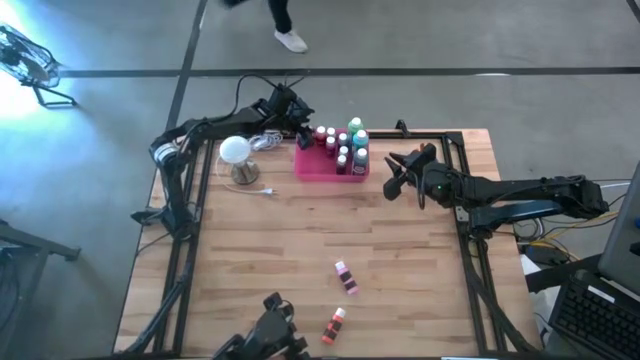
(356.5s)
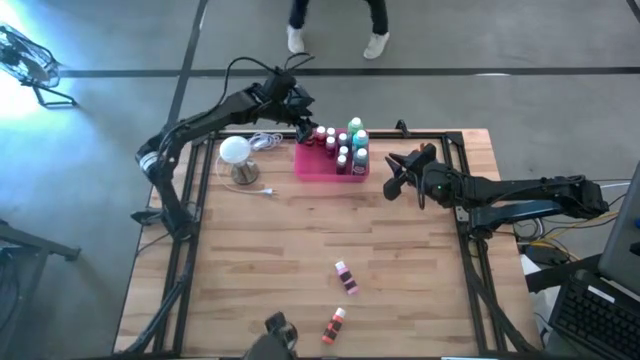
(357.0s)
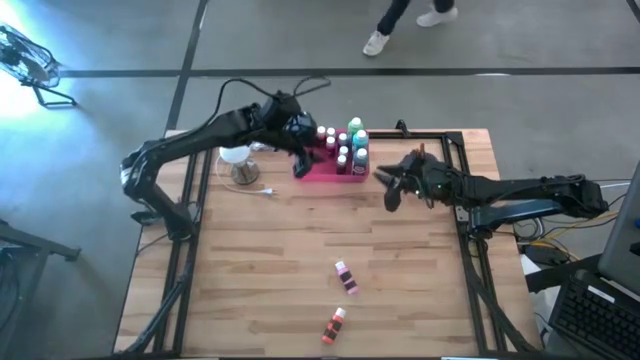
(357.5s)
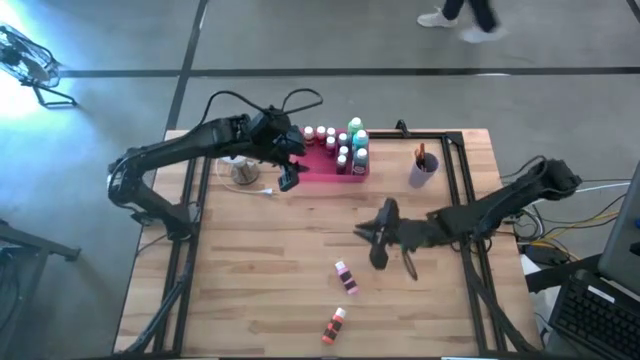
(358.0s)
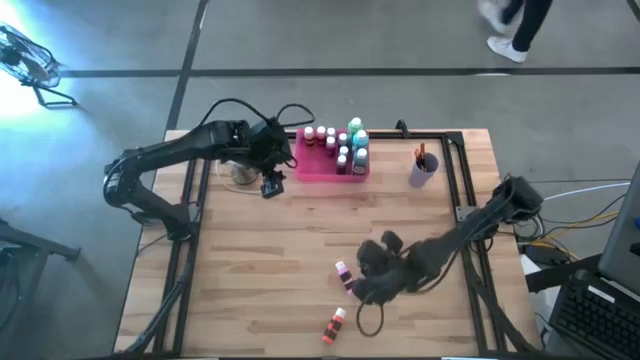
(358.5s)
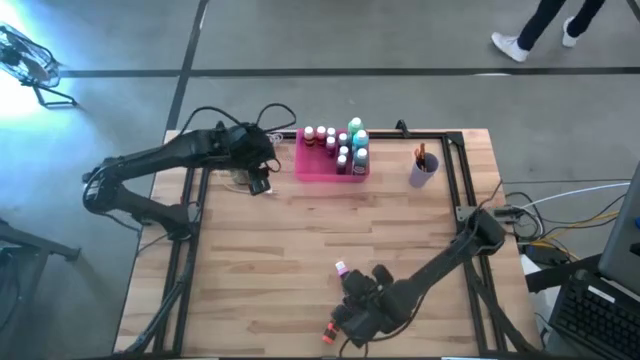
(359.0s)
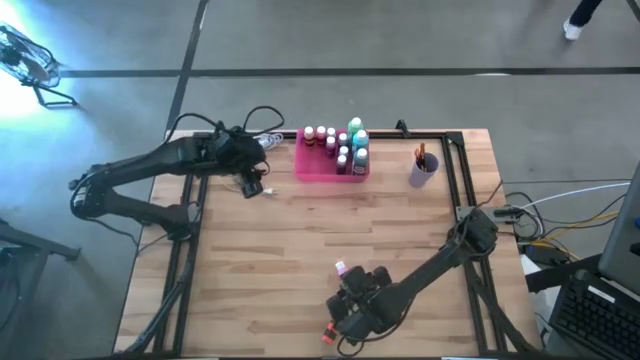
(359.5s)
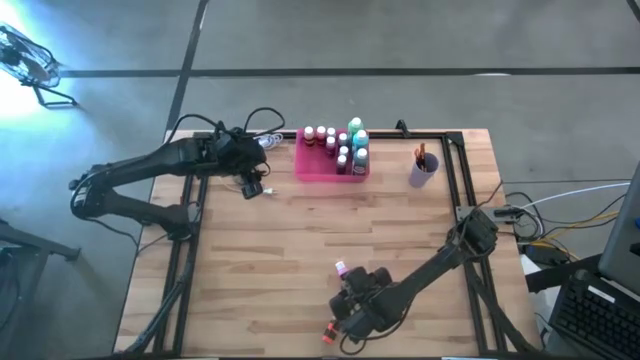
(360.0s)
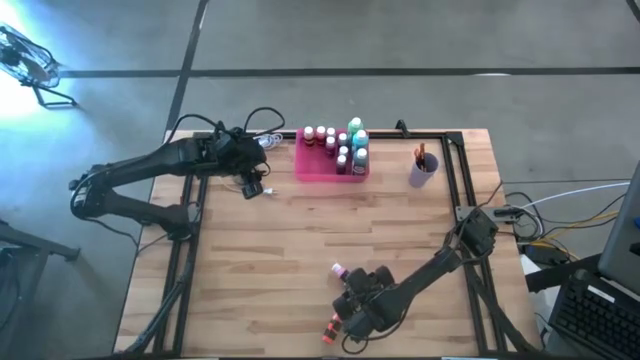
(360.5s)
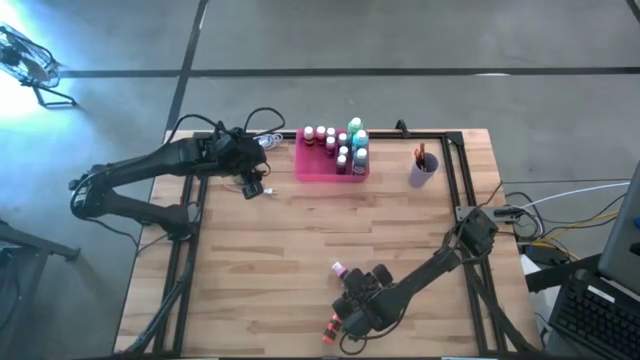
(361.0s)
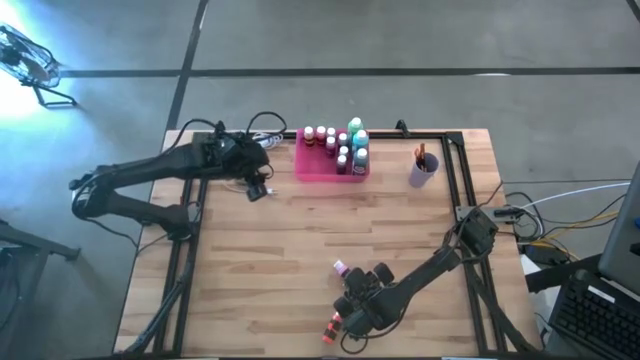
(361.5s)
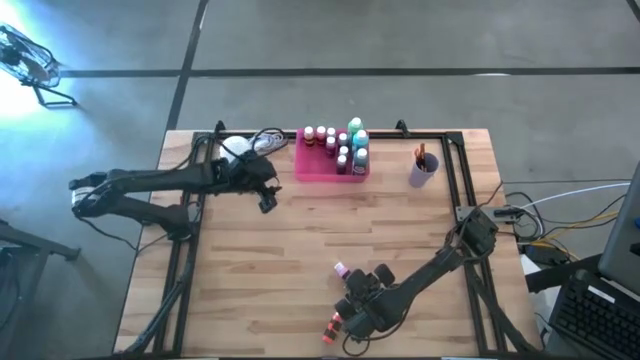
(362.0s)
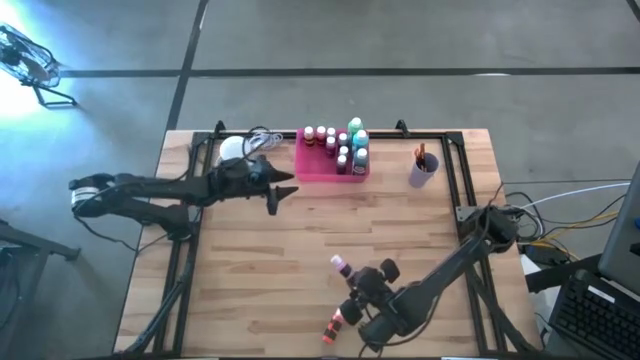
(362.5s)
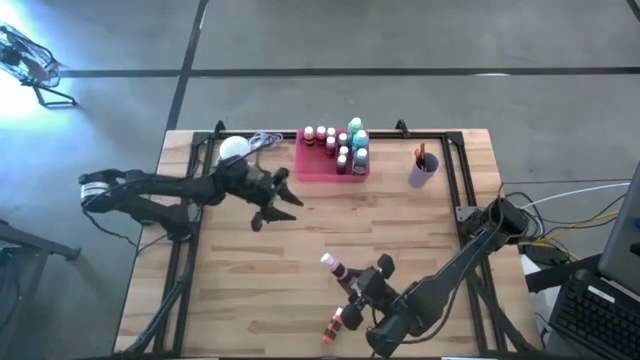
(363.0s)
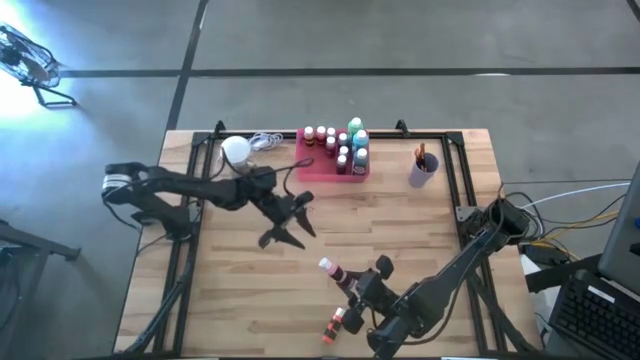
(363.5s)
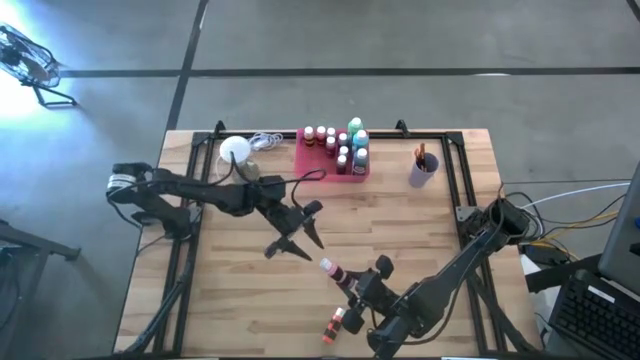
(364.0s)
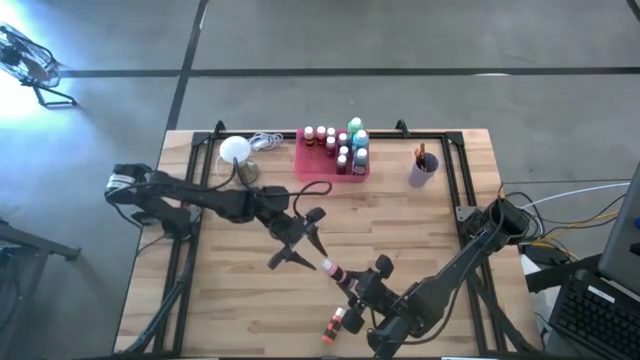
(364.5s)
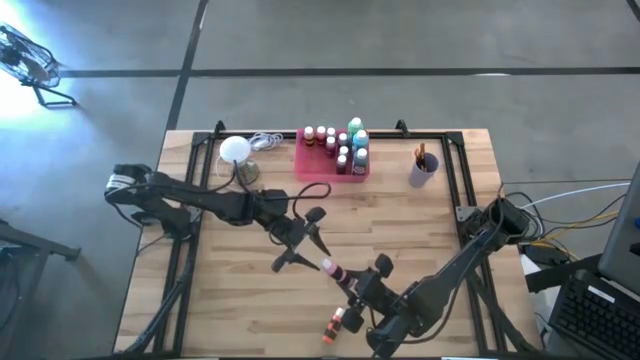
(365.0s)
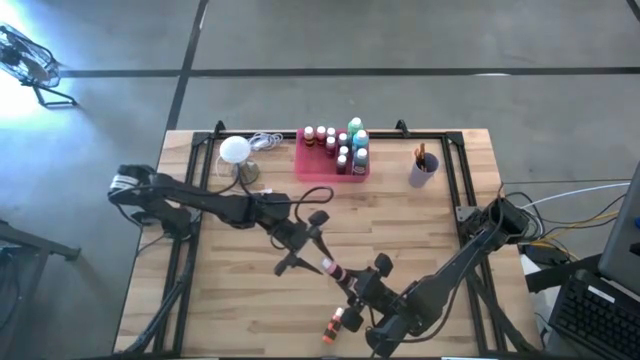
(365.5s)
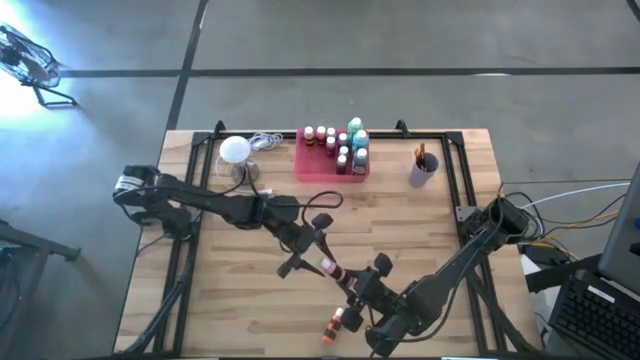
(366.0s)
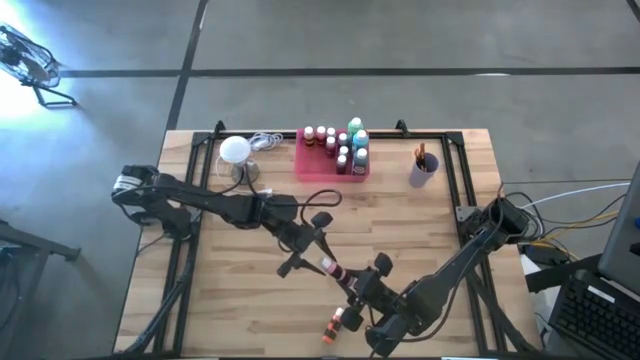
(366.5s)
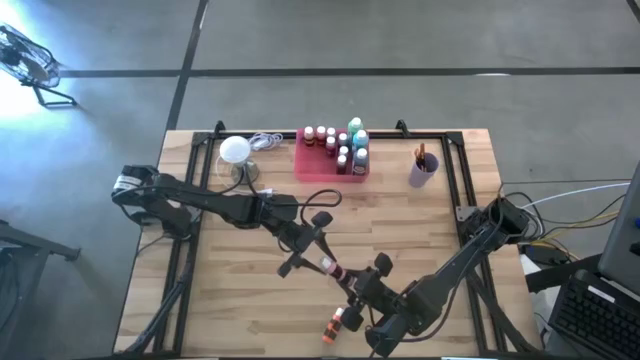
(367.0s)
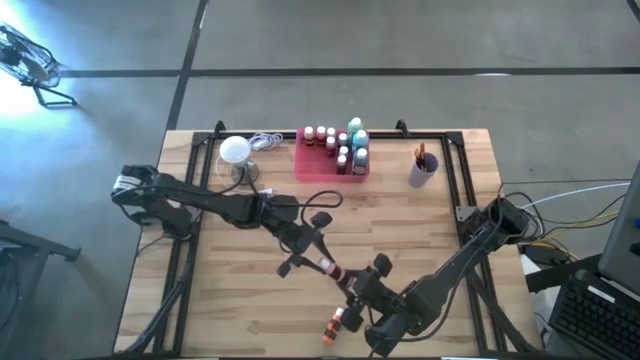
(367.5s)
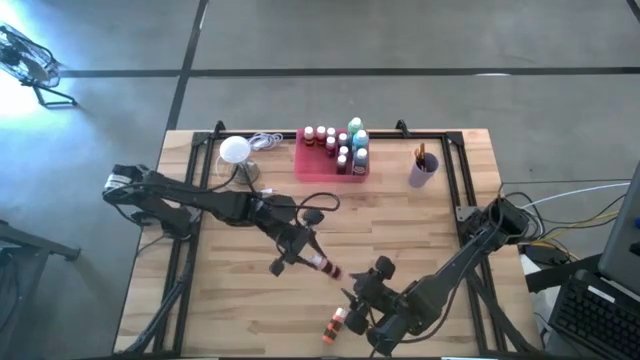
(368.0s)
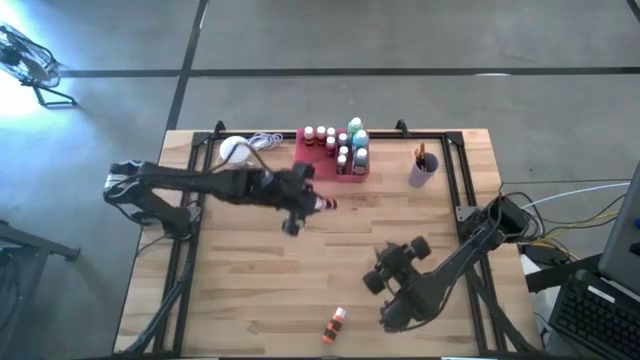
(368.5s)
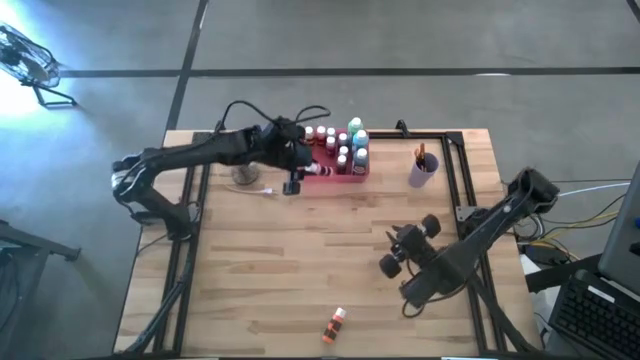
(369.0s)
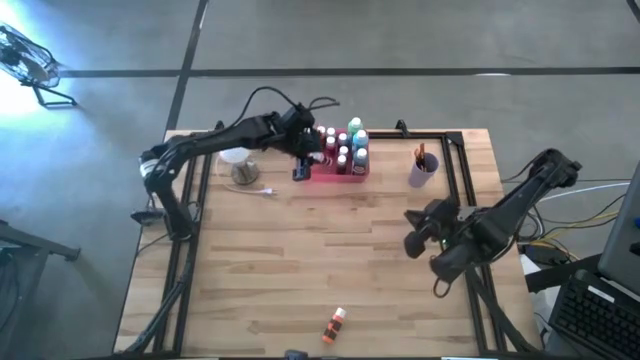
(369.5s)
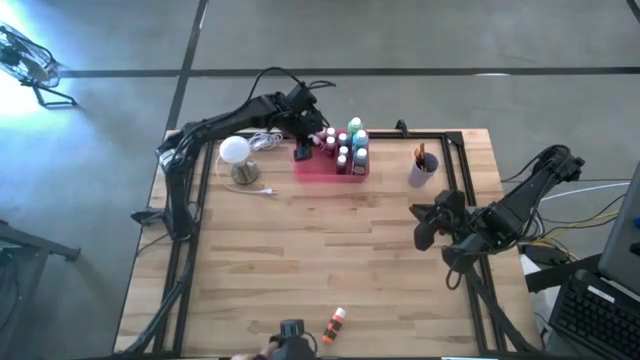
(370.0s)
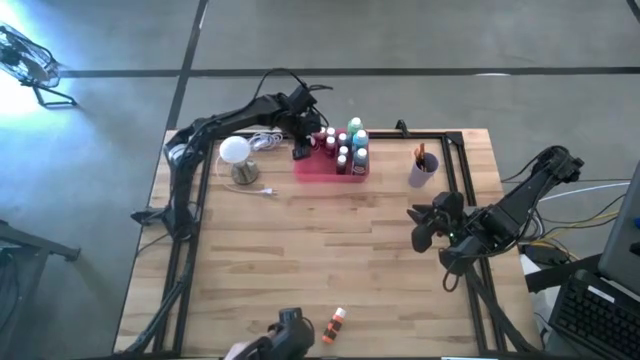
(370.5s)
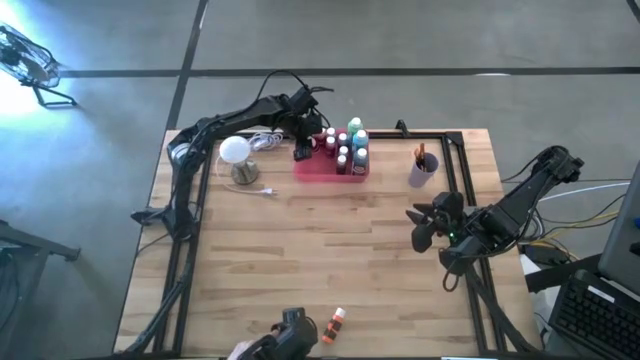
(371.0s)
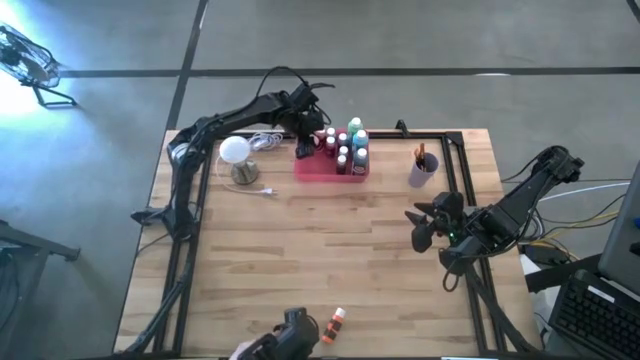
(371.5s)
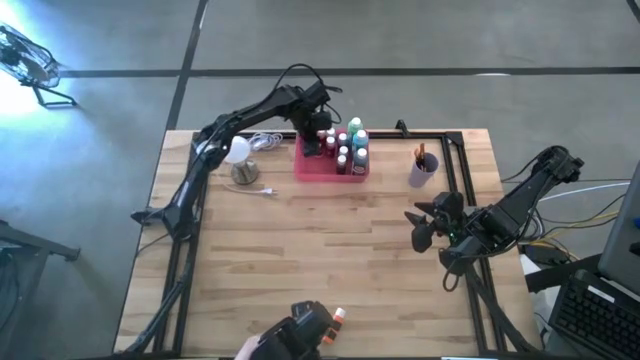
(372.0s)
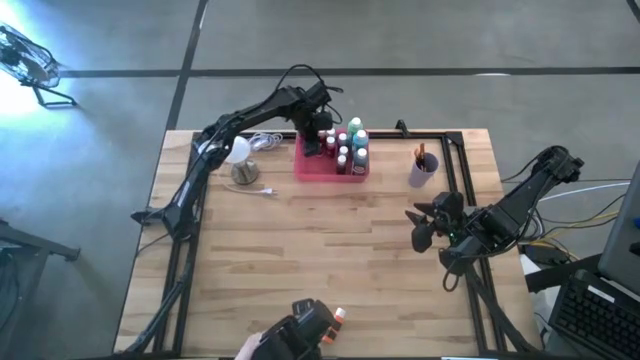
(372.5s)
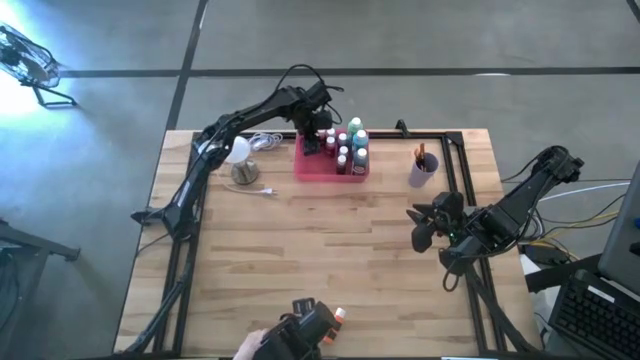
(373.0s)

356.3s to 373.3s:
Task: Pick & Place Paint Supplies
Put the light pink black paint bottle into the pink bin

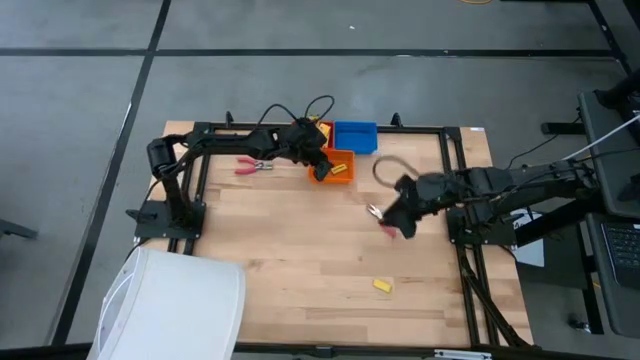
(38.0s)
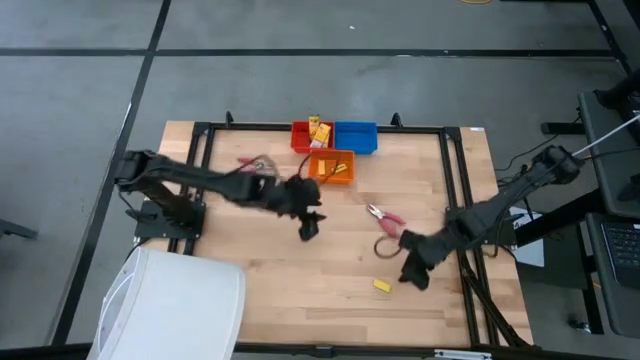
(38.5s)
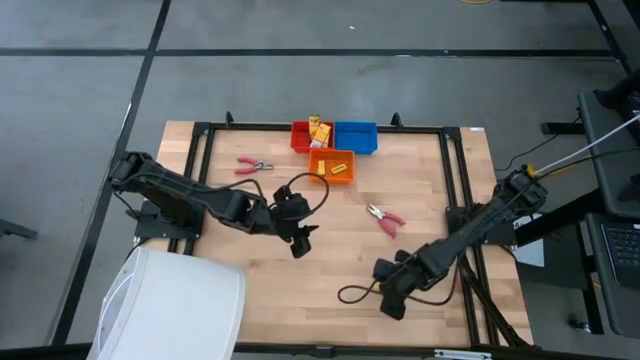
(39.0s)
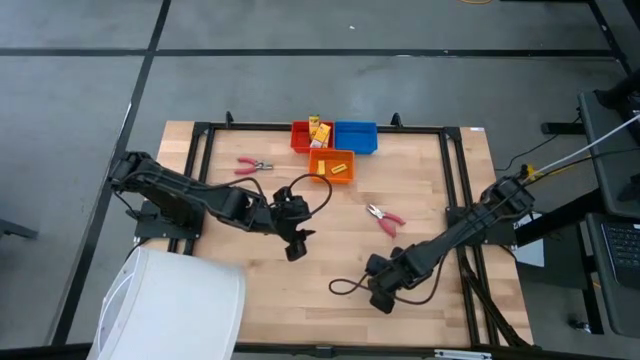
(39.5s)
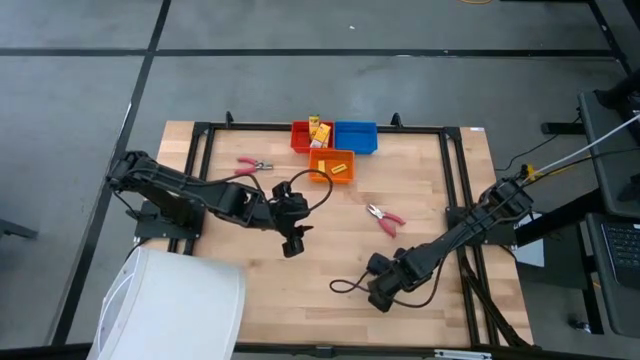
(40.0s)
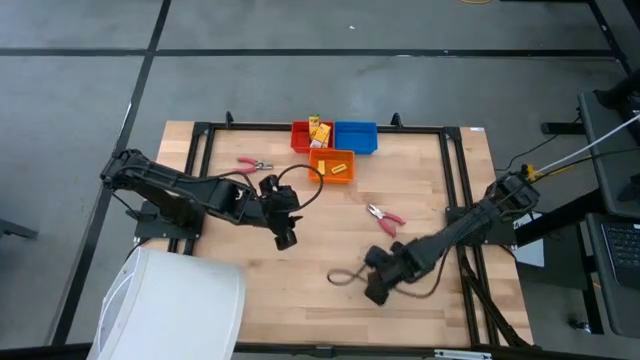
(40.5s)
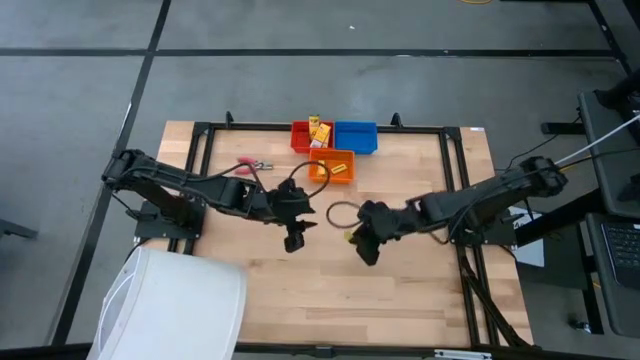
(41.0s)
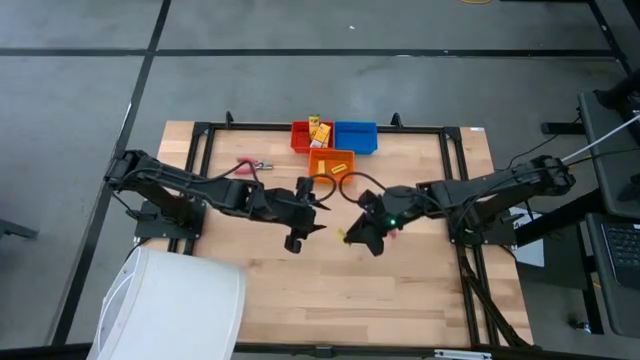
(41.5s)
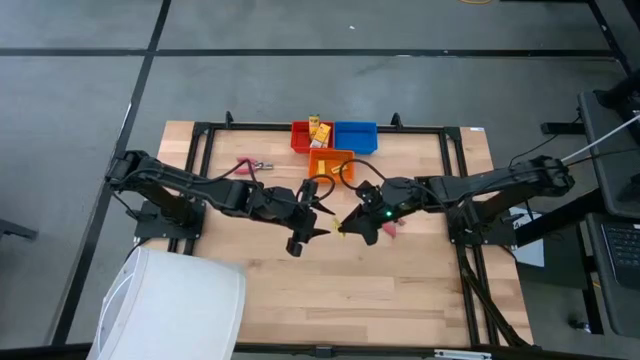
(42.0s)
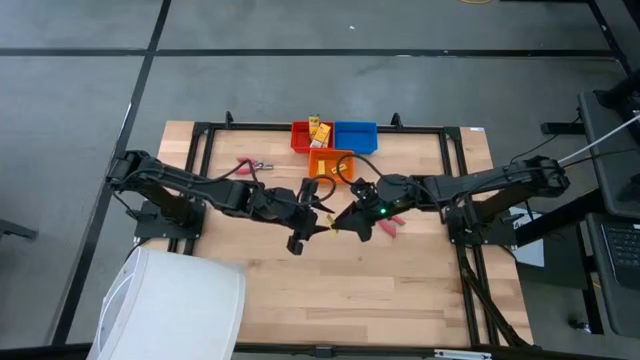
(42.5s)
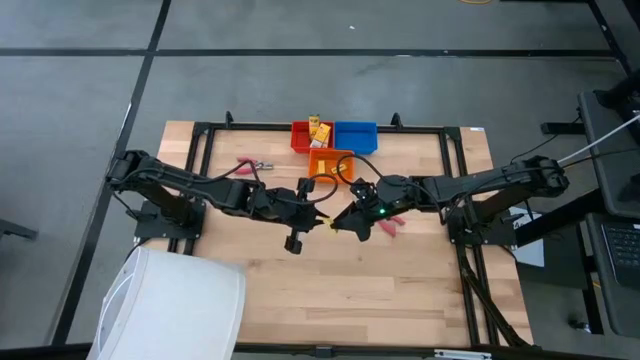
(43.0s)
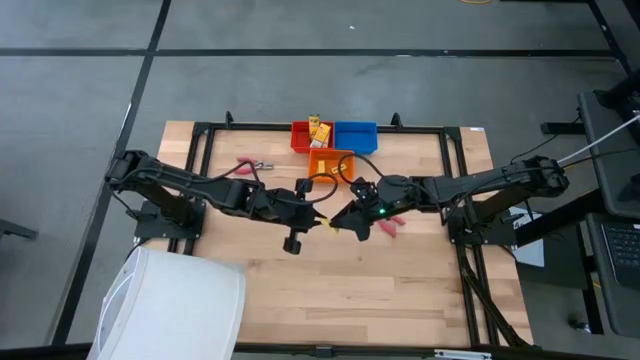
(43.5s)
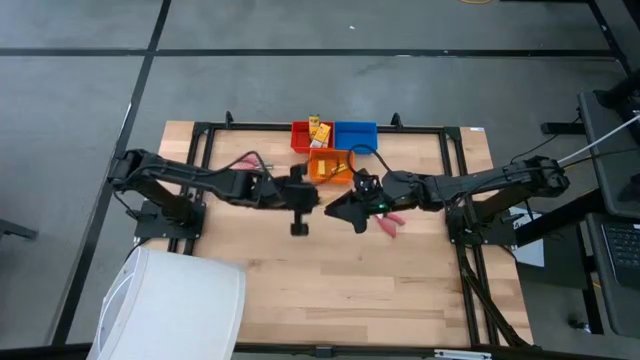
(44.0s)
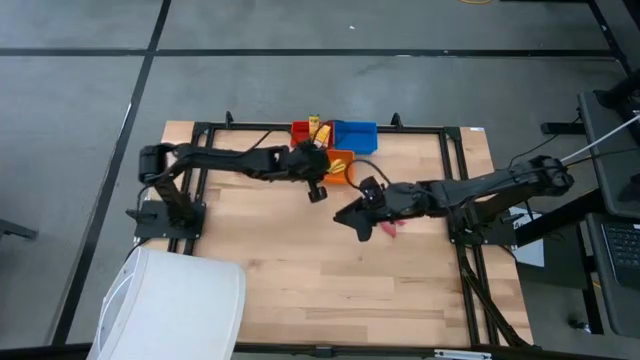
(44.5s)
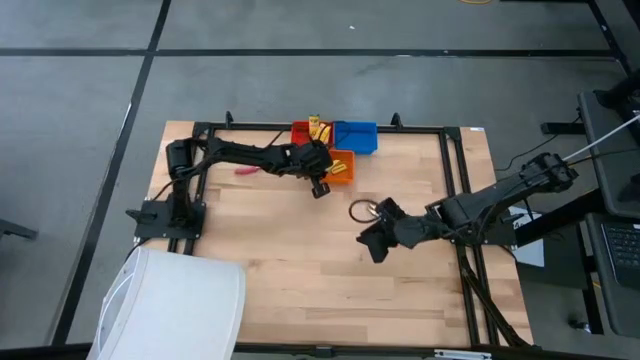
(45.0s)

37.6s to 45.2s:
Task: Pick & Place School Supplies
Put the yellow eraser into the orange bin
